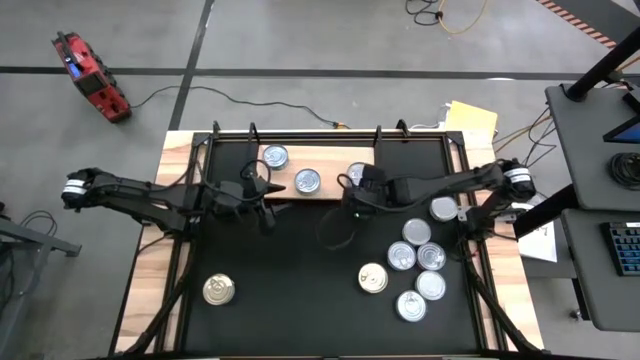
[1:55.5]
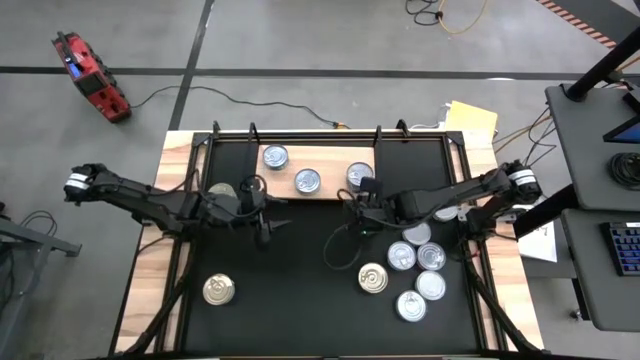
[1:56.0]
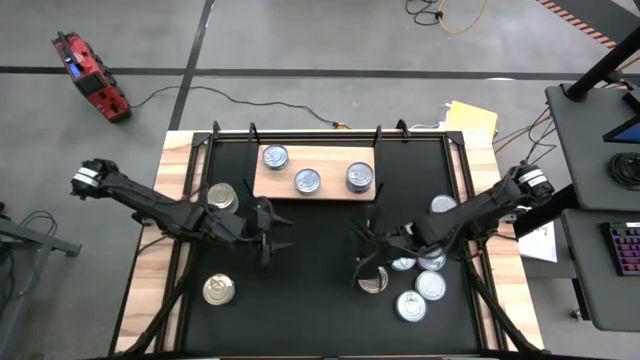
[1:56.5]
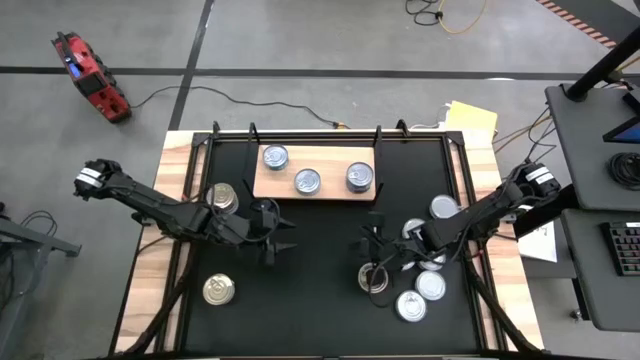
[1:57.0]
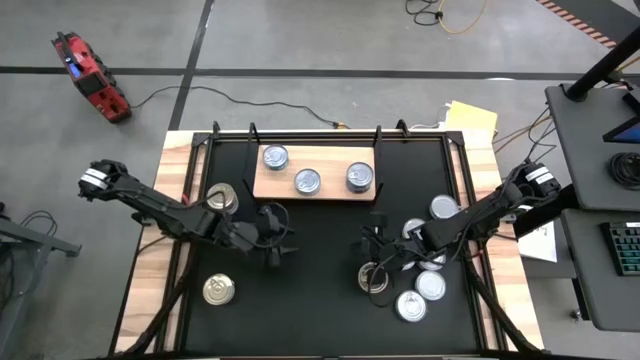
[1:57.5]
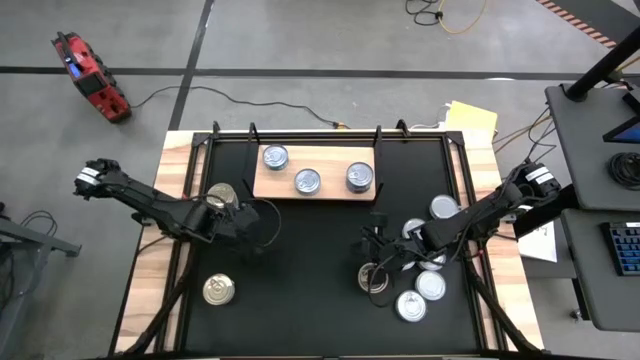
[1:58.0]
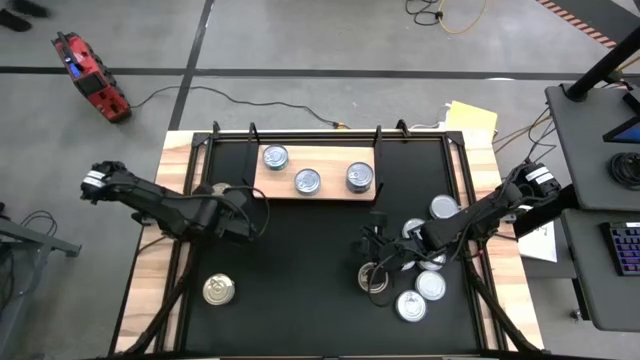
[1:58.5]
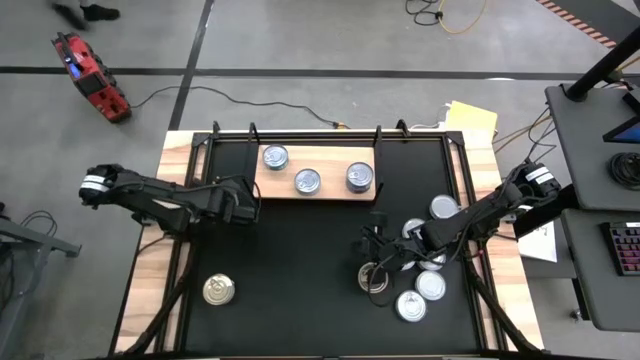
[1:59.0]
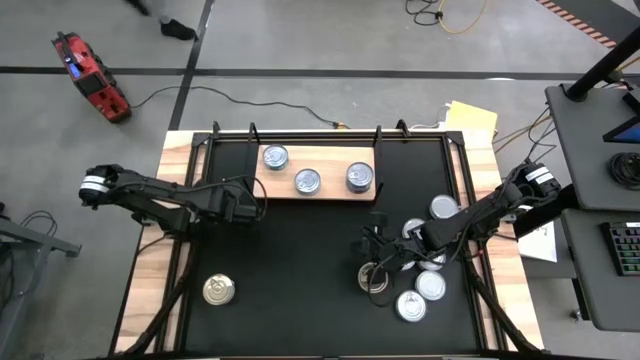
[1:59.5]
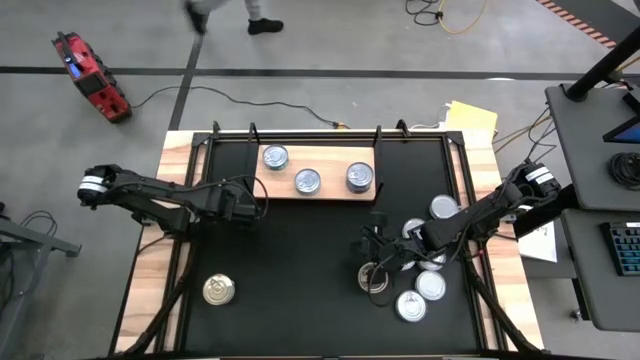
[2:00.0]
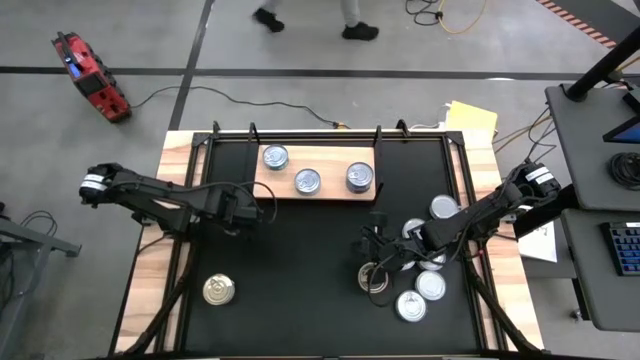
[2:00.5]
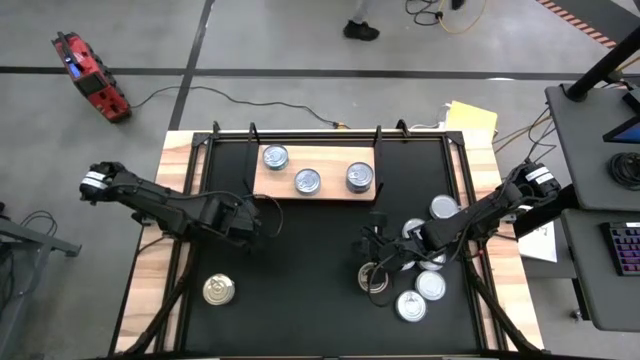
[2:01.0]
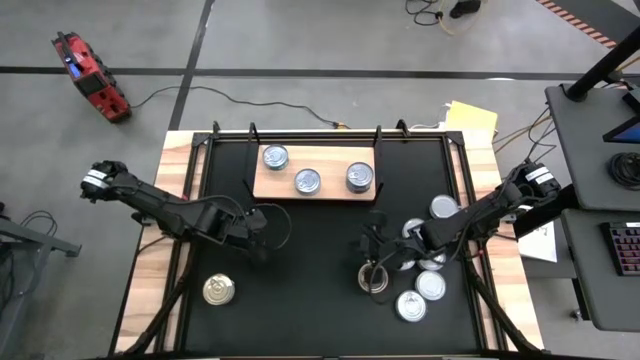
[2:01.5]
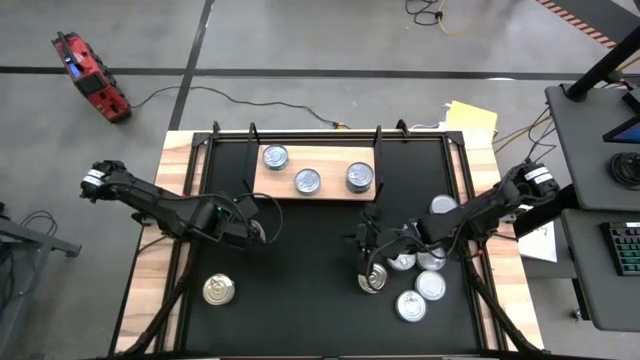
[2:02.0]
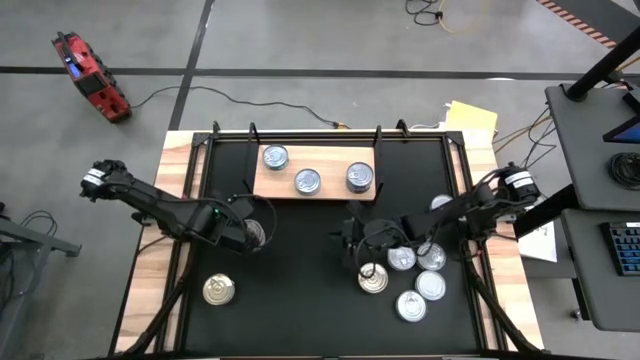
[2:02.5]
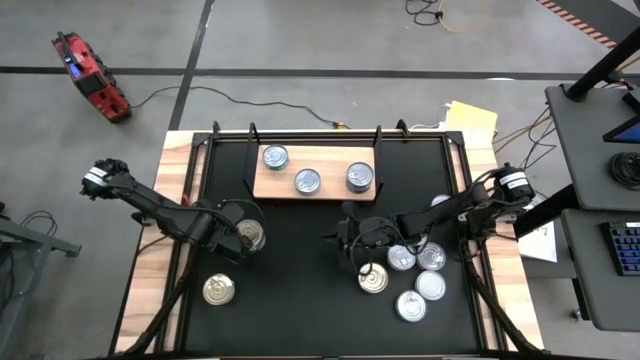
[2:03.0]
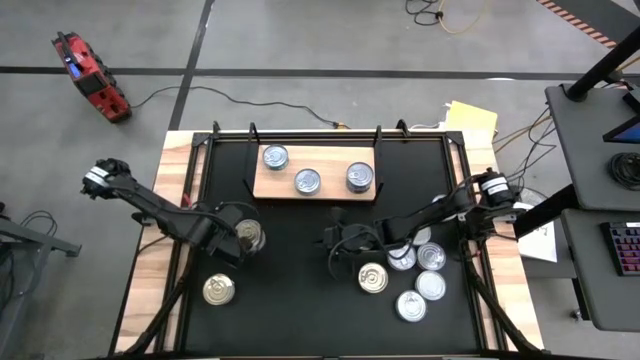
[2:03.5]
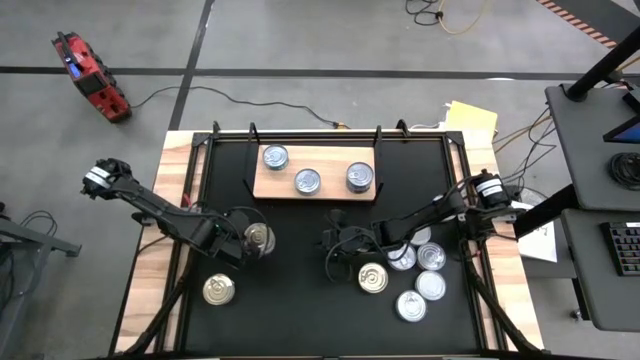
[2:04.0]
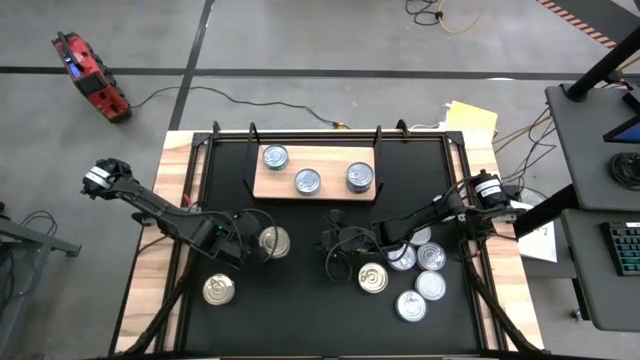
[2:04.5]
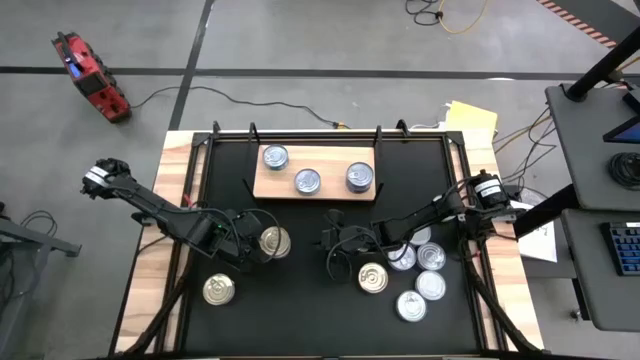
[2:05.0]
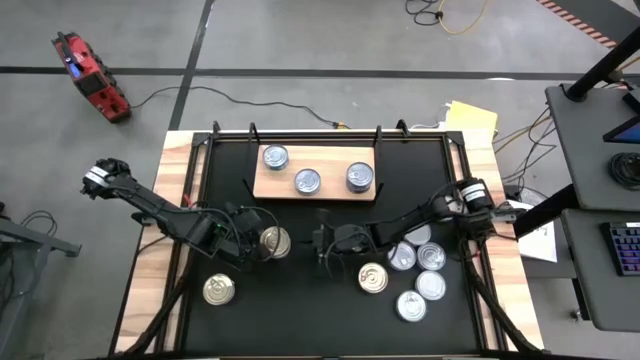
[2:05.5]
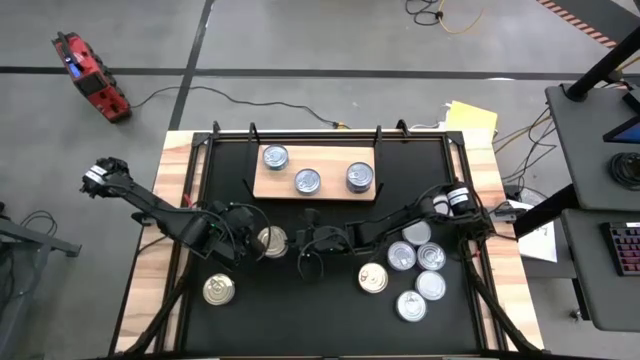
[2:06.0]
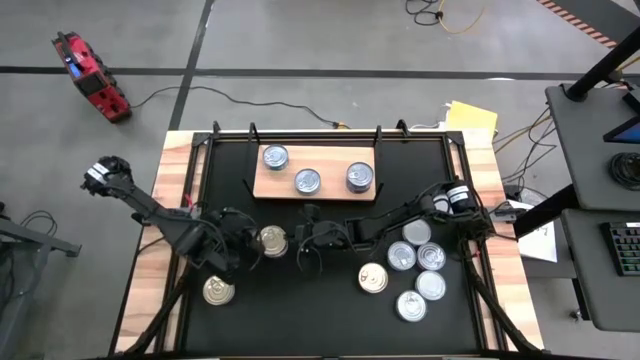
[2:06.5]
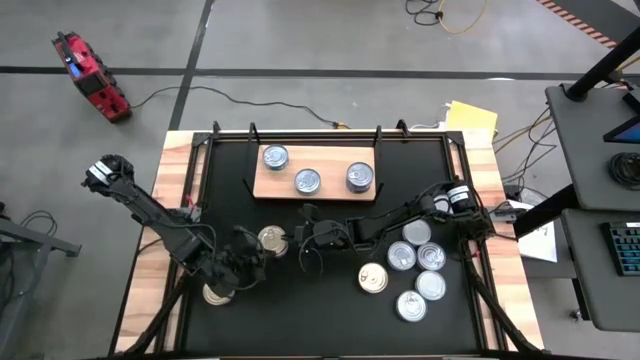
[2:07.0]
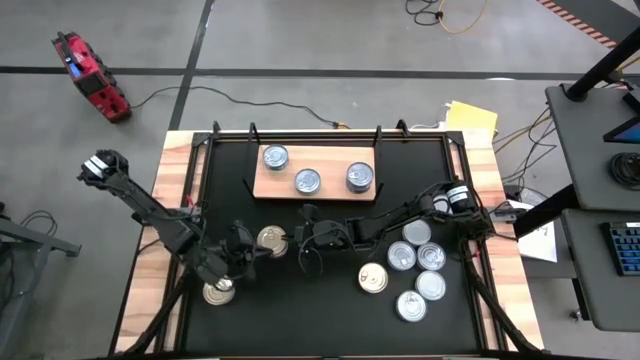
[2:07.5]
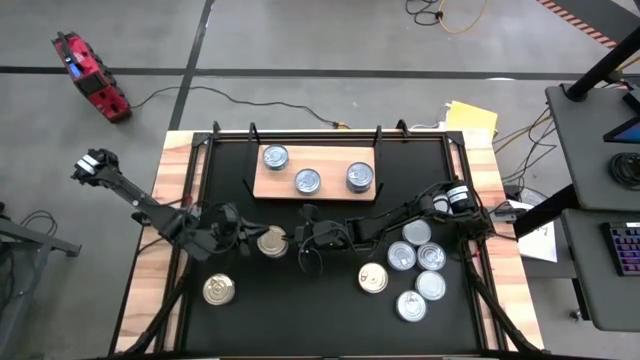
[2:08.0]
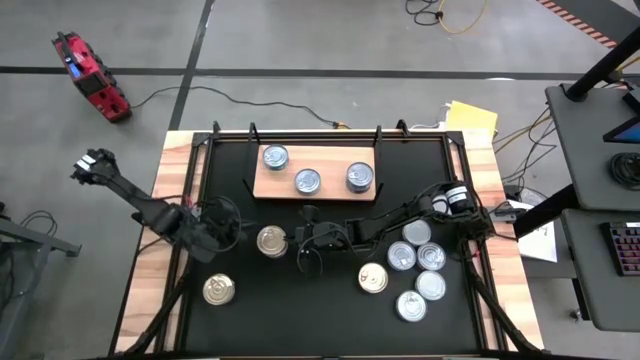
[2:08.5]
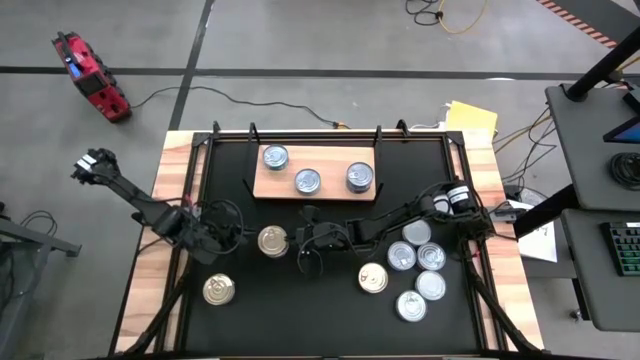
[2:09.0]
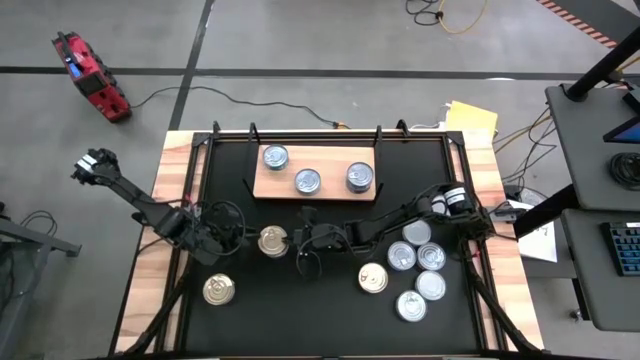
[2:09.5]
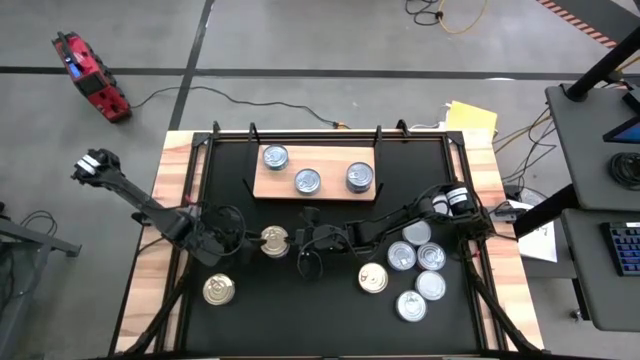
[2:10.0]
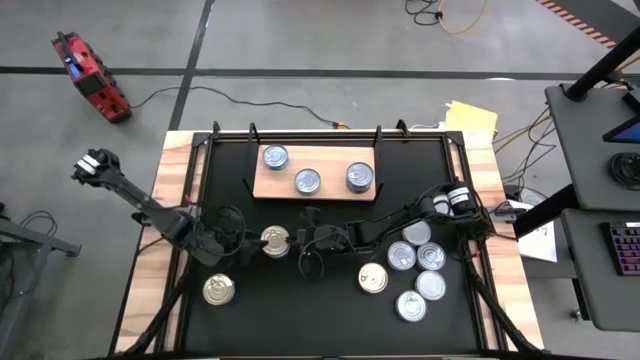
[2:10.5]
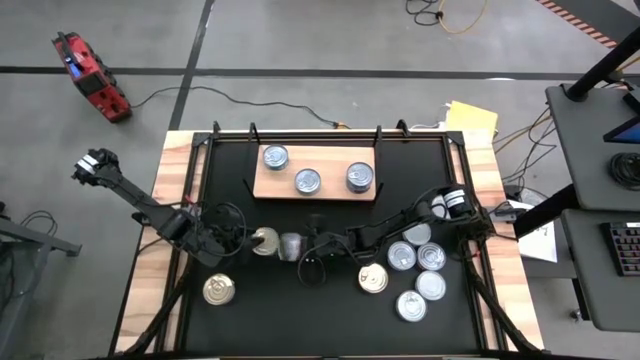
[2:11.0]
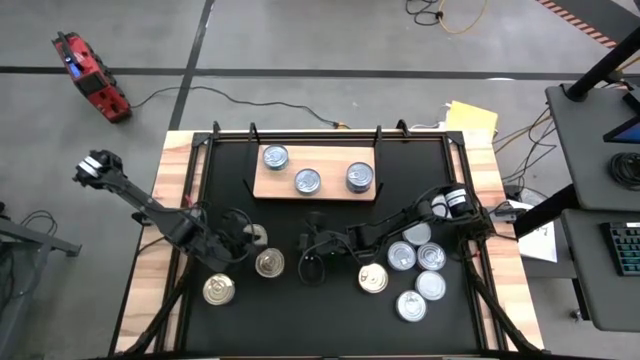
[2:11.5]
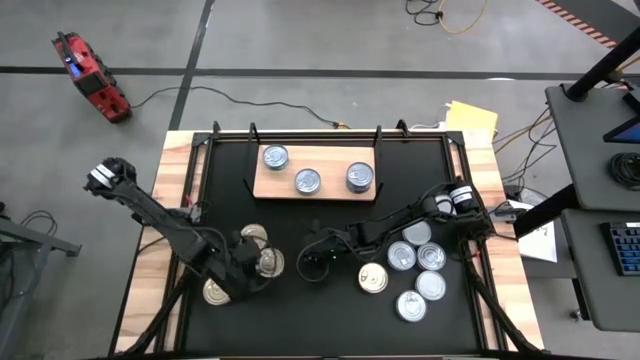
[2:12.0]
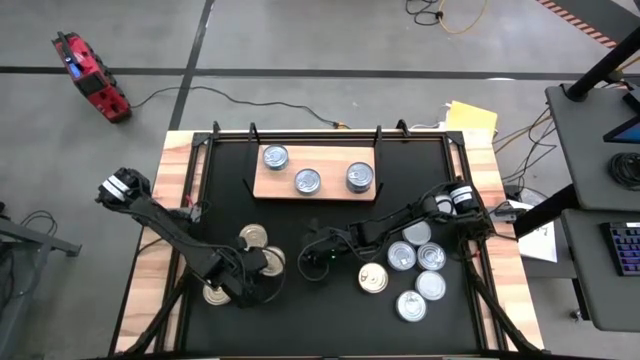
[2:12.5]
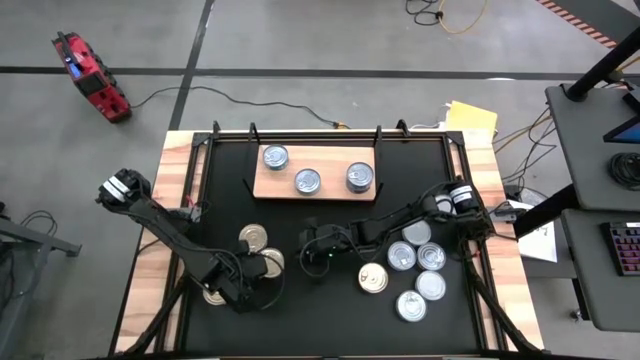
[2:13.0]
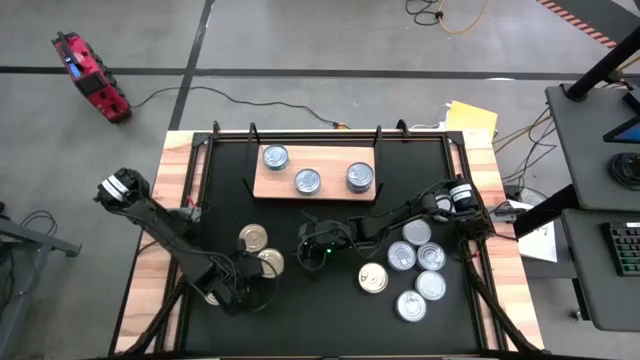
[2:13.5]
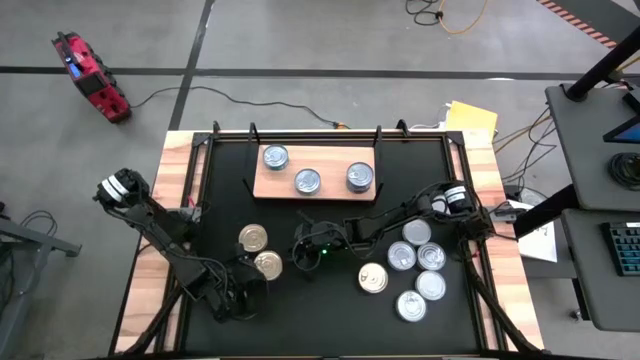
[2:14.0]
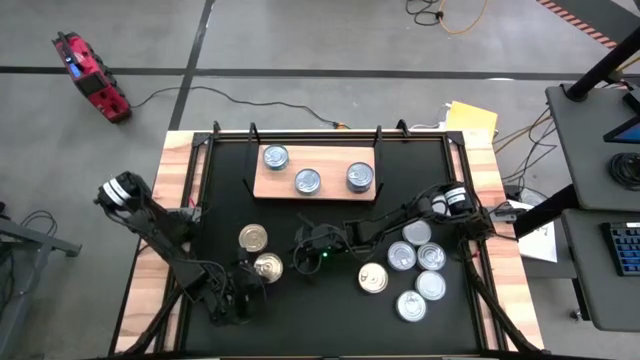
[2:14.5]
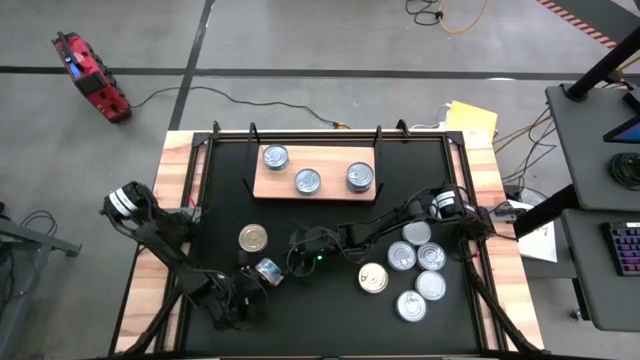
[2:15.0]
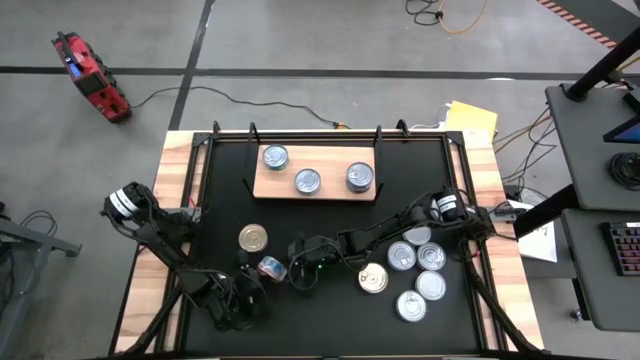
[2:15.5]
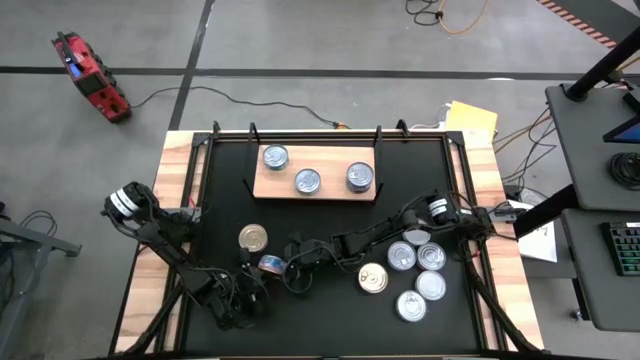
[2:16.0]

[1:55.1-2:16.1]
Task: Stack canned seafood by type on shelf
Put the blue tuna can on the shelf
